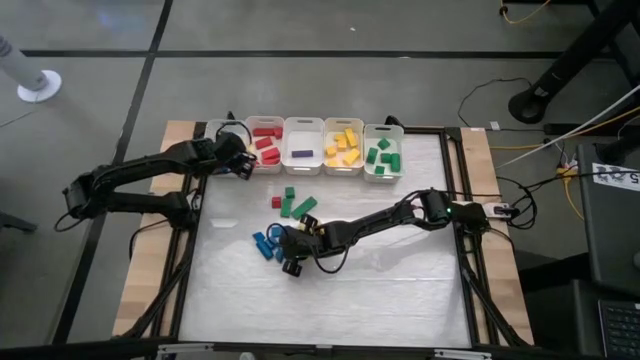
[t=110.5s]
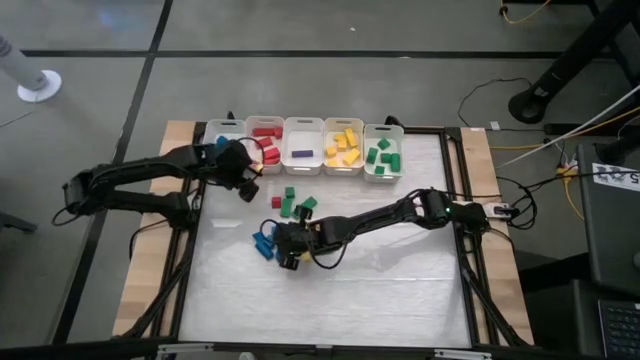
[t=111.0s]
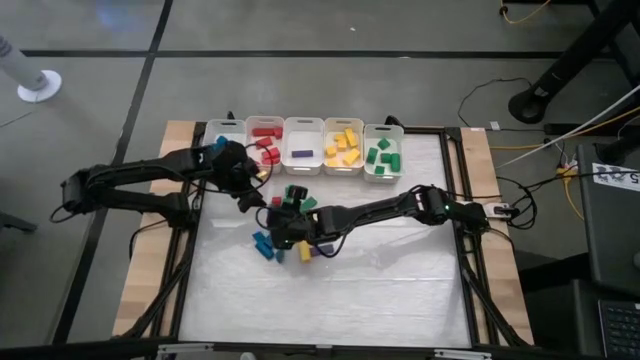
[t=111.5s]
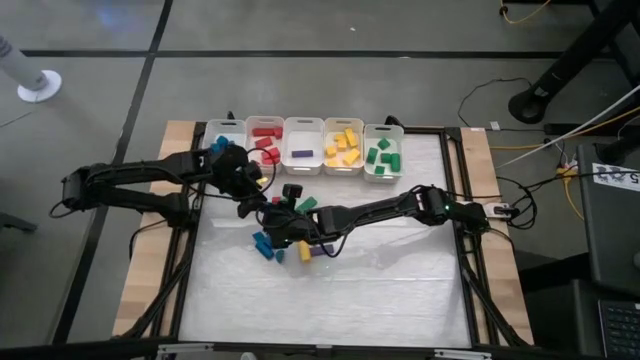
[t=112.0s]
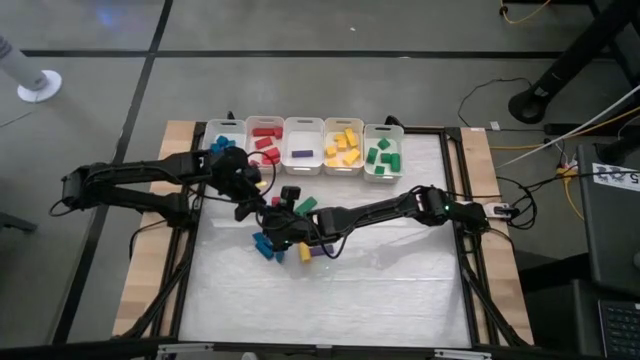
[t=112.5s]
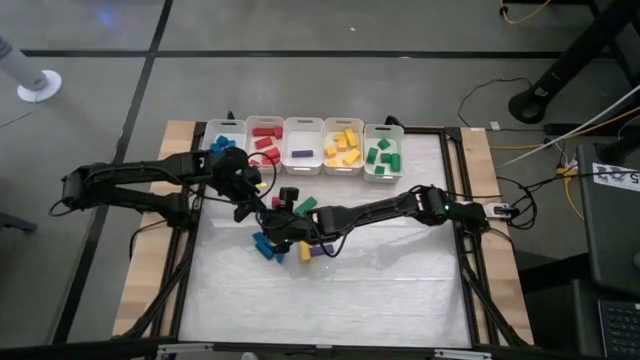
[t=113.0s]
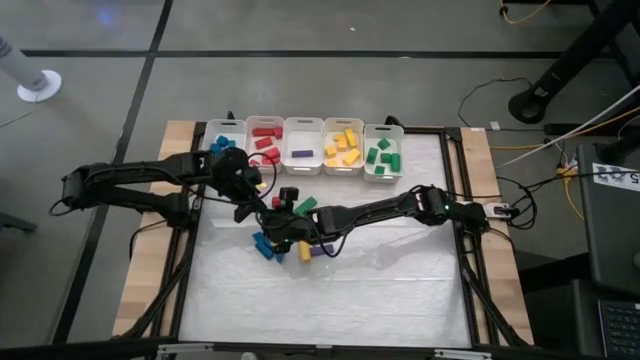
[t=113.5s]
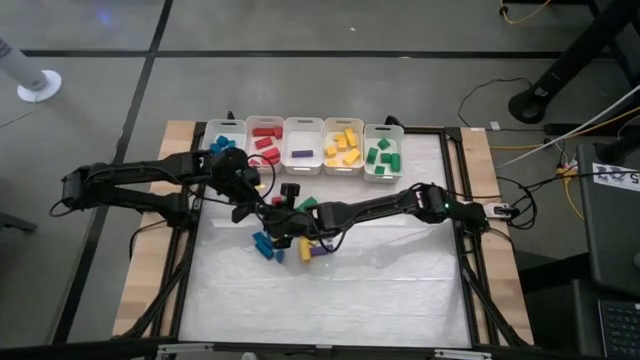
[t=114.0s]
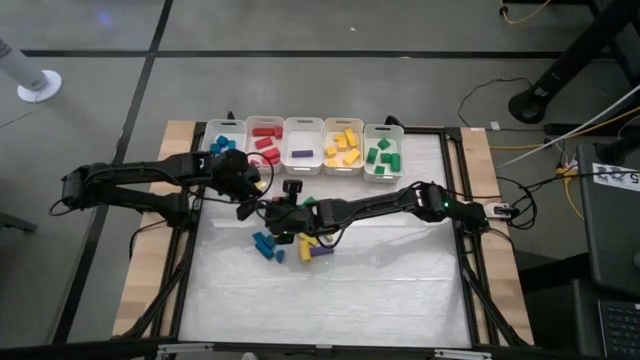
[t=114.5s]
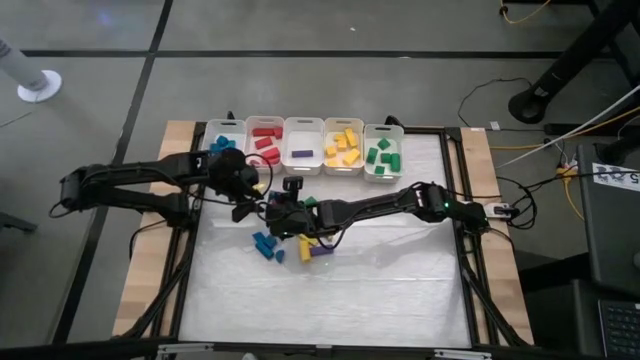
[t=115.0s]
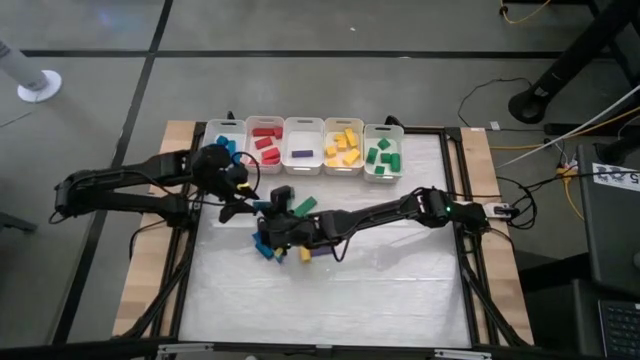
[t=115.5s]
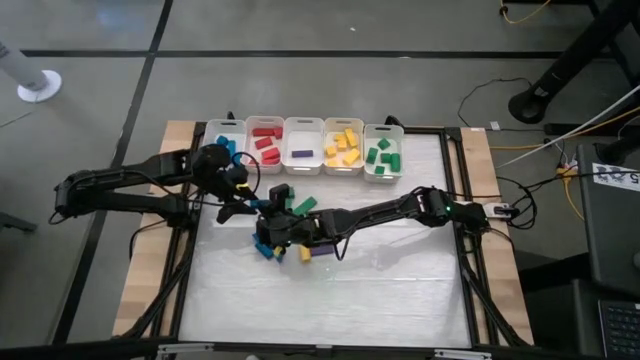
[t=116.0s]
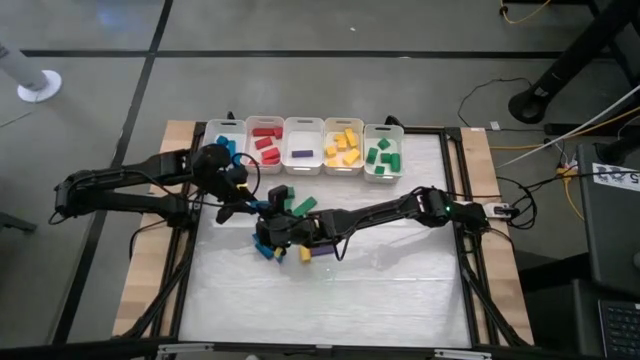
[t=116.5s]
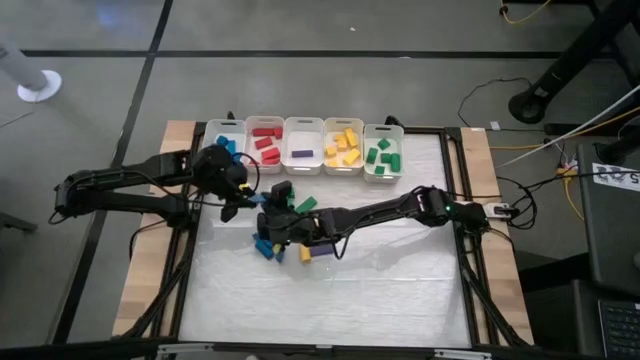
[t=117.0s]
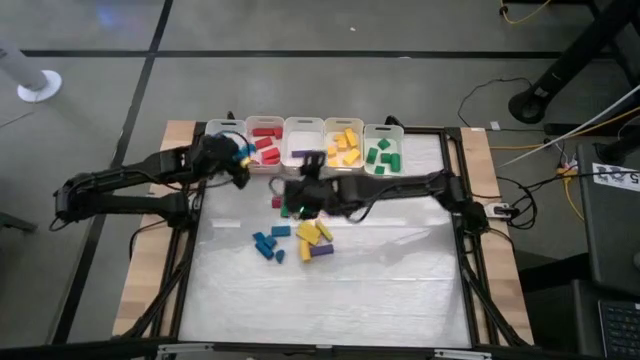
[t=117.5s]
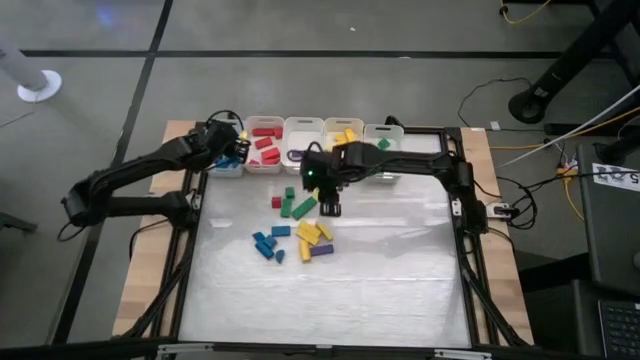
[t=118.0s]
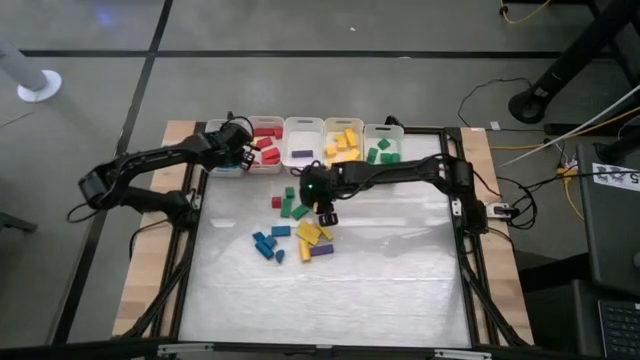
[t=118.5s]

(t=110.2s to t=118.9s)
Task: Sort blocks
Put the blue block into the left white bin

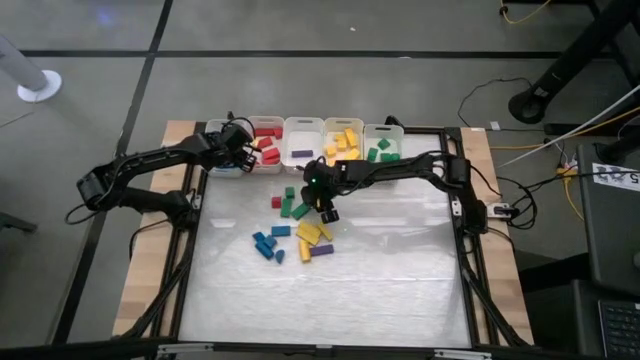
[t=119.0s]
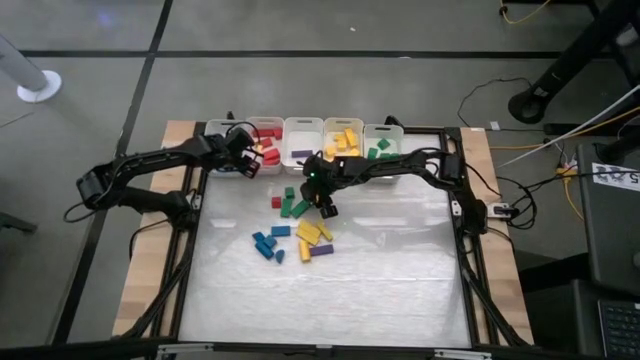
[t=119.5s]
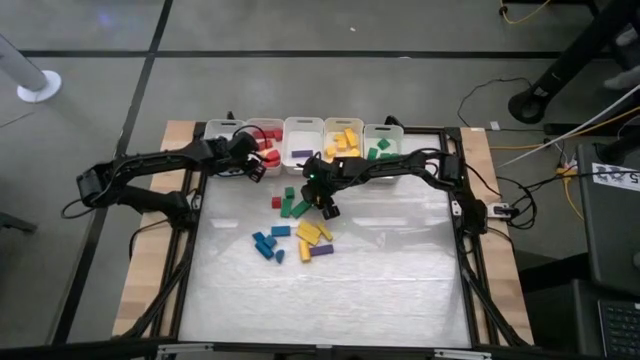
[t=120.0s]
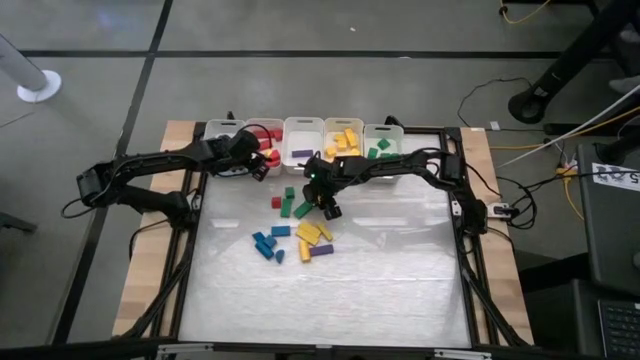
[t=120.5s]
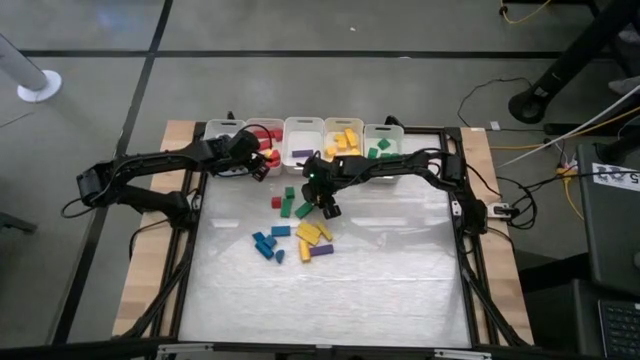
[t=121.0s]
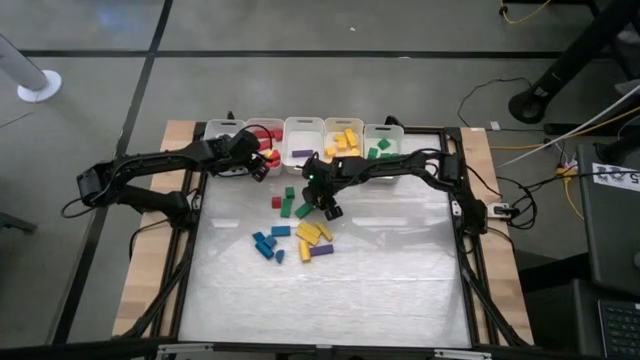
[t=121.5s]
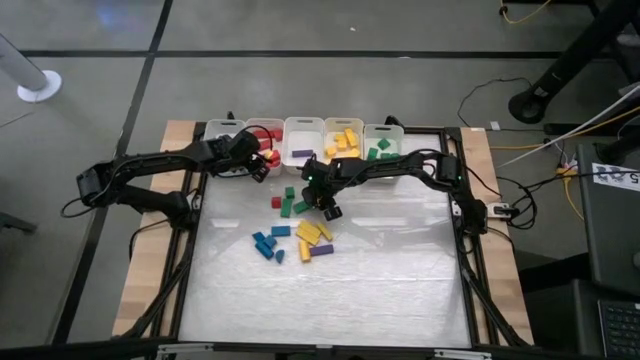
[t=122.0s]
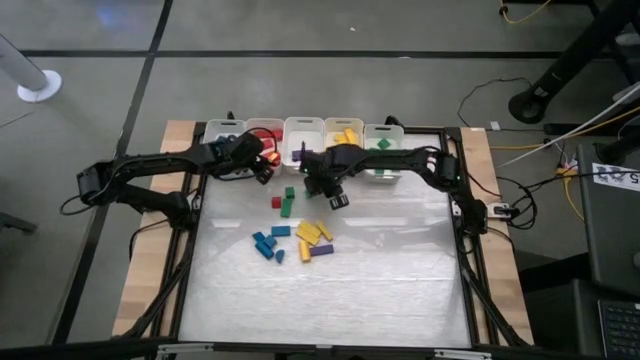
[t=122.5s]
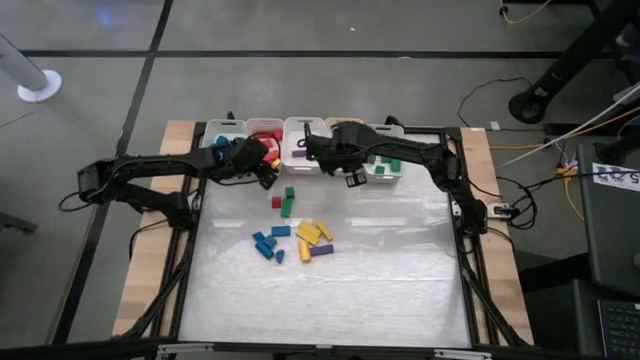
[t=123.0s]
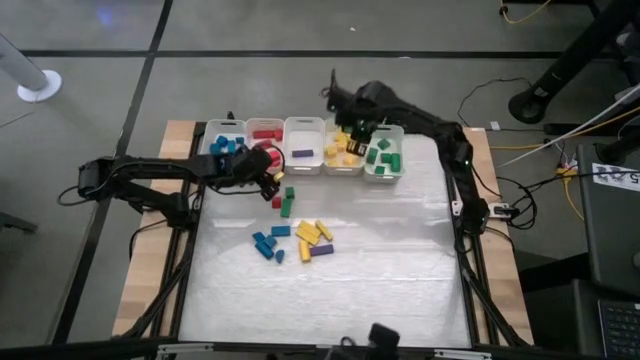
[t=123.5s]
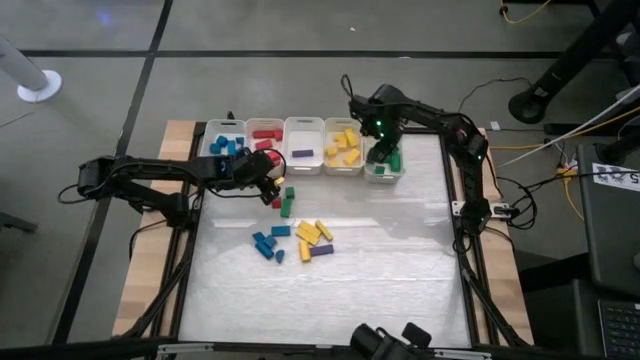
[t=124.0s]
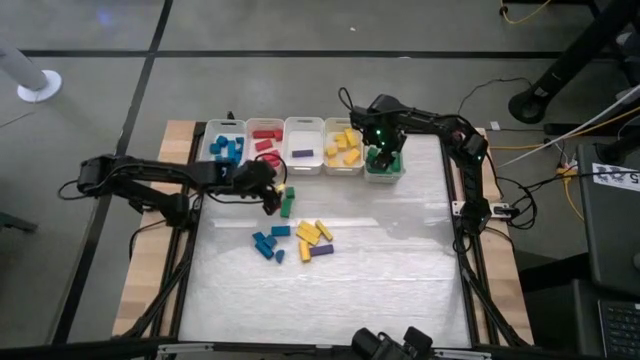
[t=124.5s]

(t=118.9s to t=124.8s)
Put the green block into the right white bin

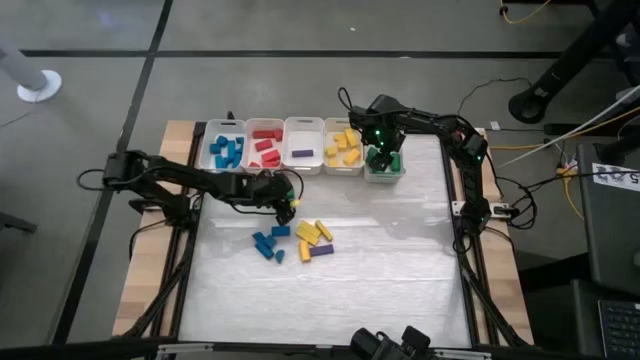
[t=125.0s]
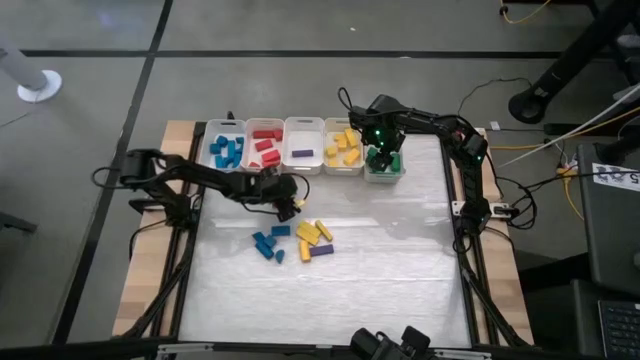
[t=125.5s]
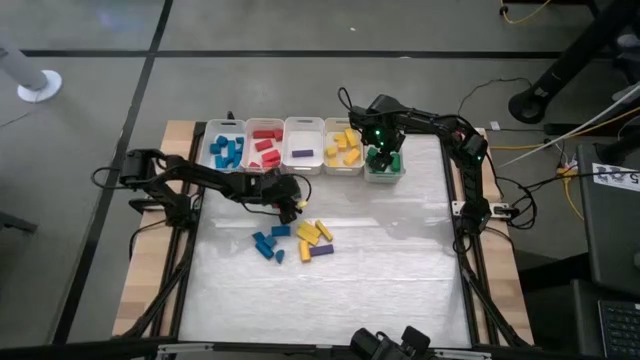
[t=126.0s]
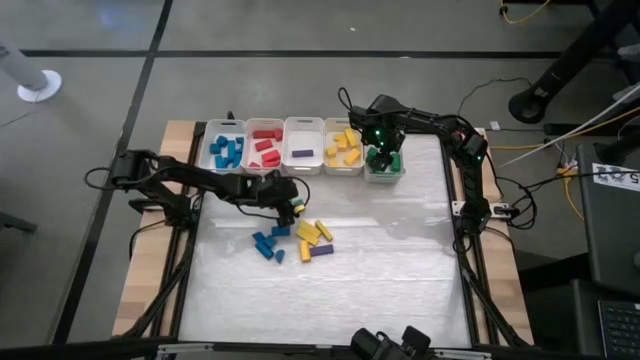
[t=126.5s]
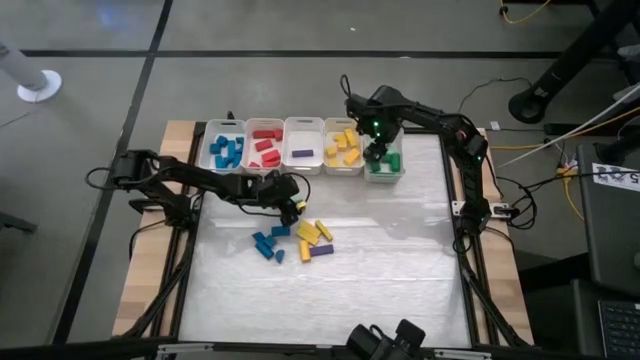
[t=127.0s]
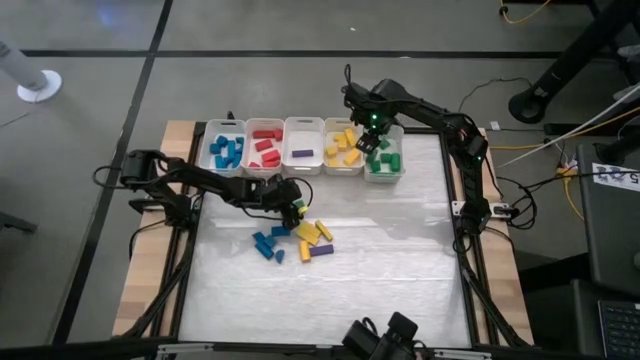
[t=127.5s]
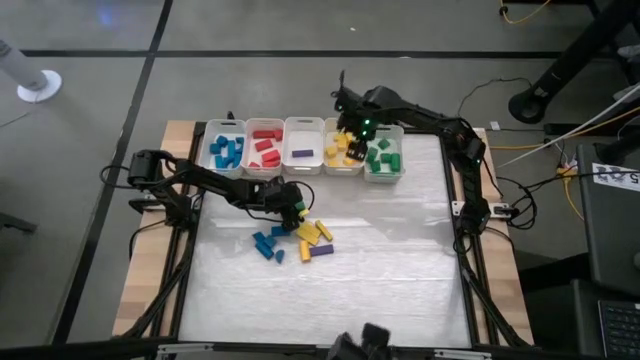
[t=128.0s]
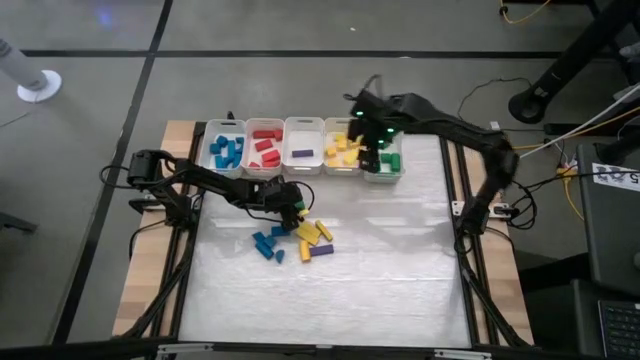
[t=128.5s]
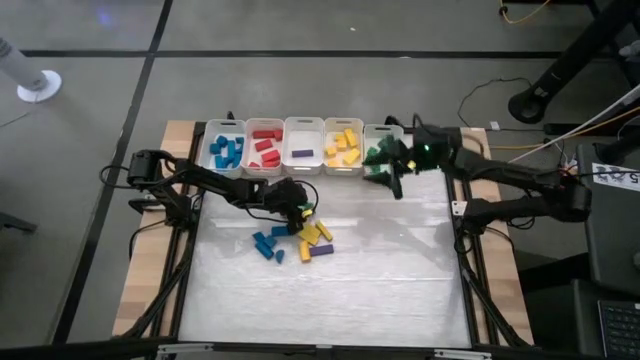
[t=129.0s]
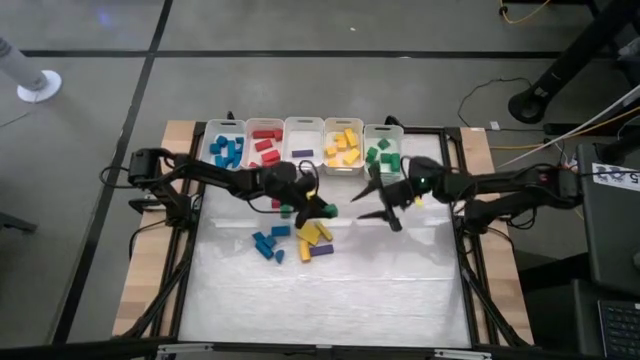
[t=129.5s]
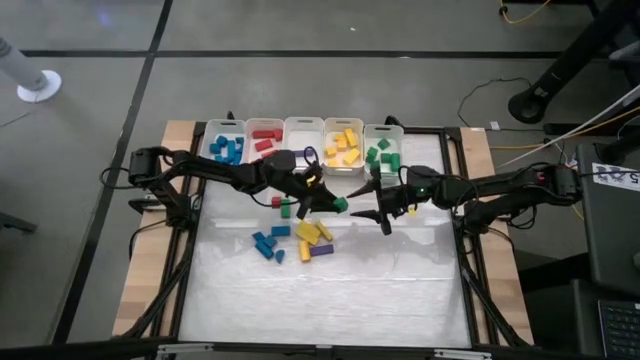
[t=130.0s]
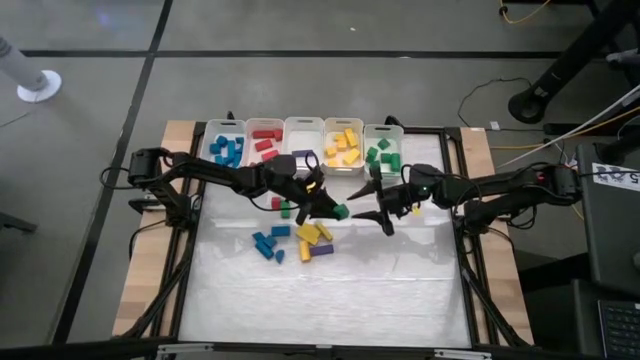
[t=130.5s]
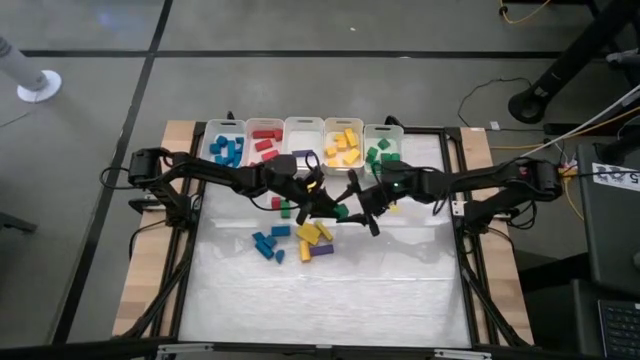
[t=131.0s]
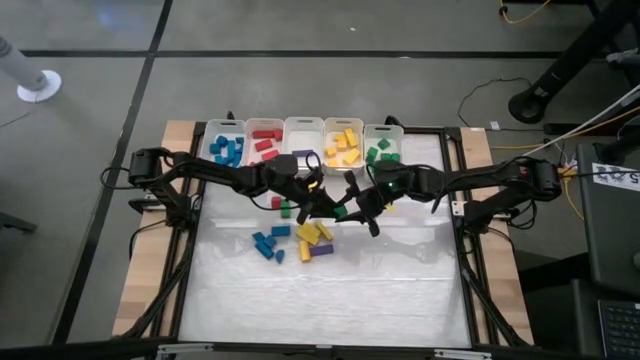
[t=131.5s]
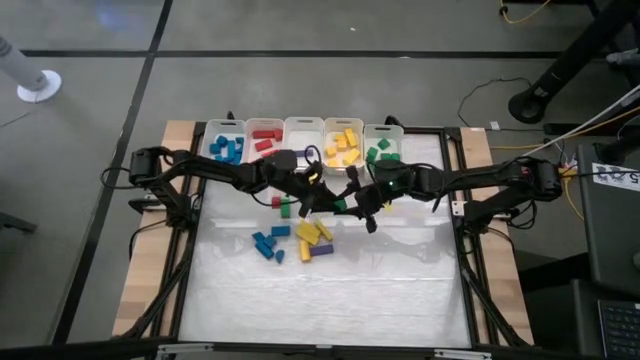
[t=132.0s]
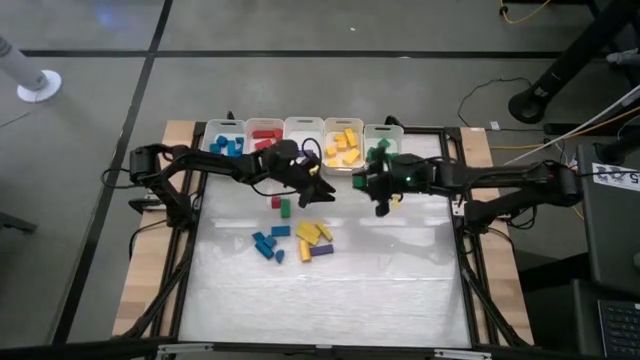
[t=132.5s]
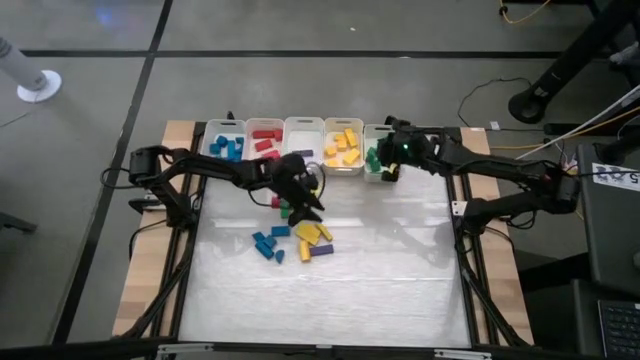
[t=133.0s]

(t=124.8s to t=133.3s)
Put the green block into the right white bin
